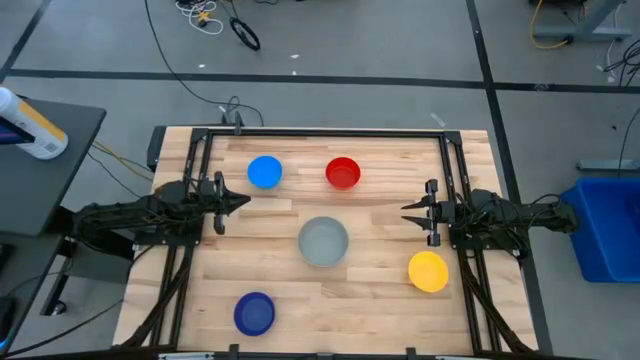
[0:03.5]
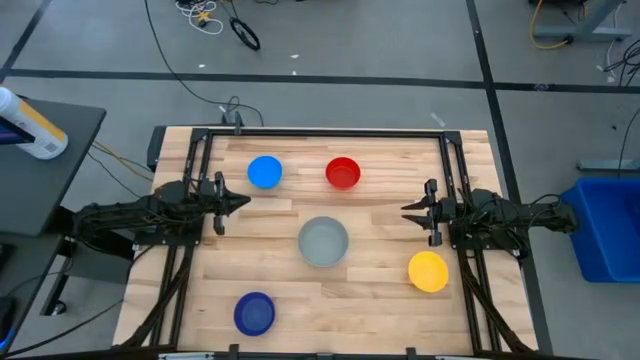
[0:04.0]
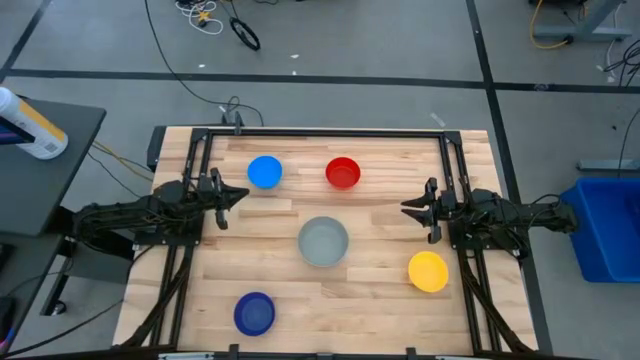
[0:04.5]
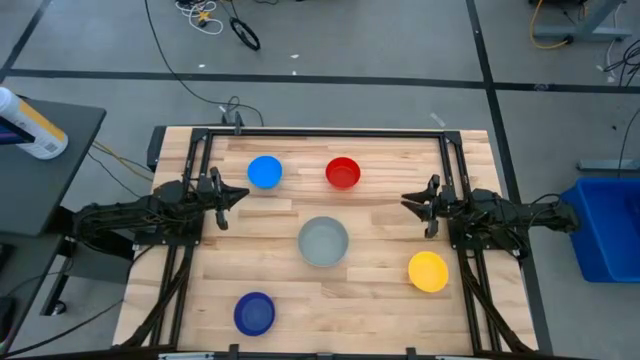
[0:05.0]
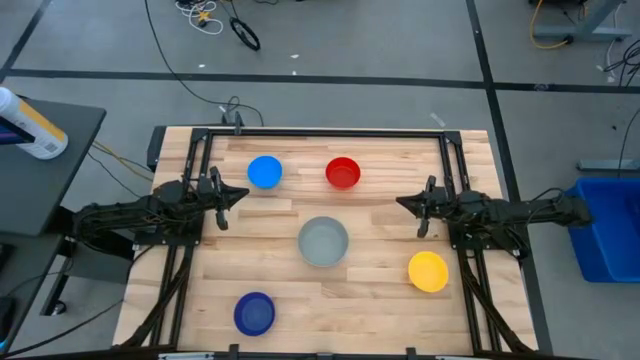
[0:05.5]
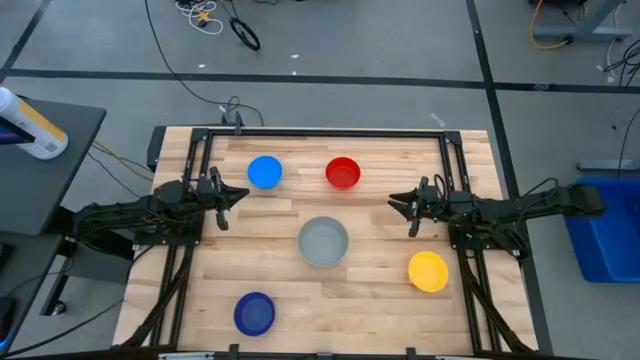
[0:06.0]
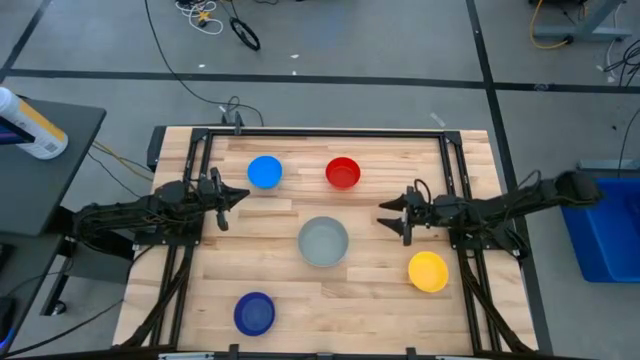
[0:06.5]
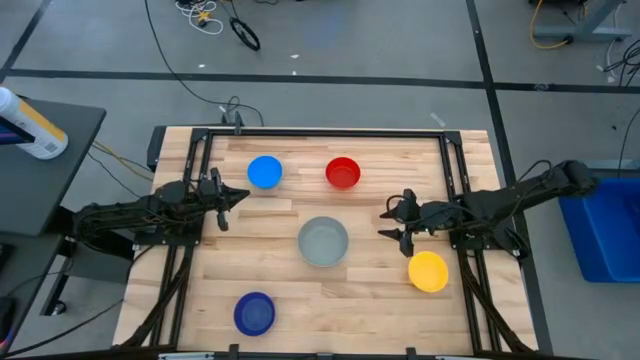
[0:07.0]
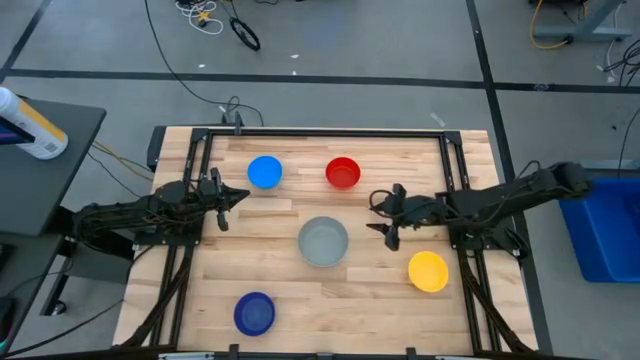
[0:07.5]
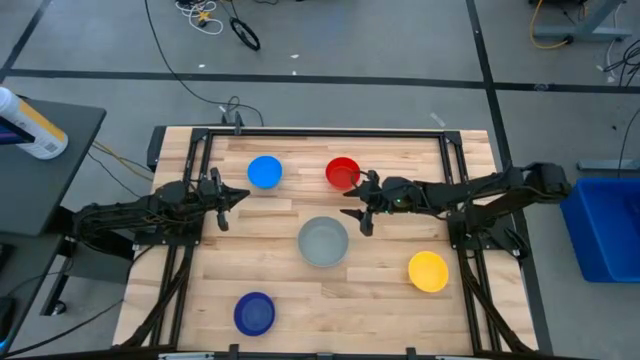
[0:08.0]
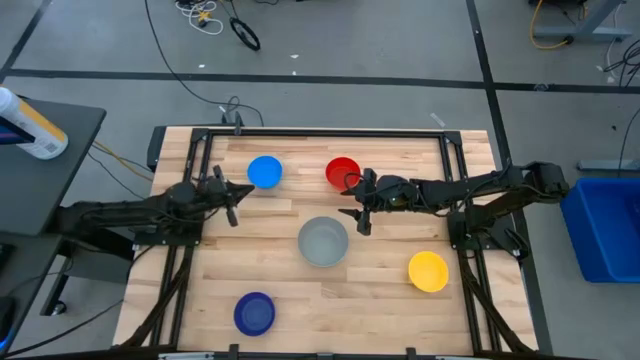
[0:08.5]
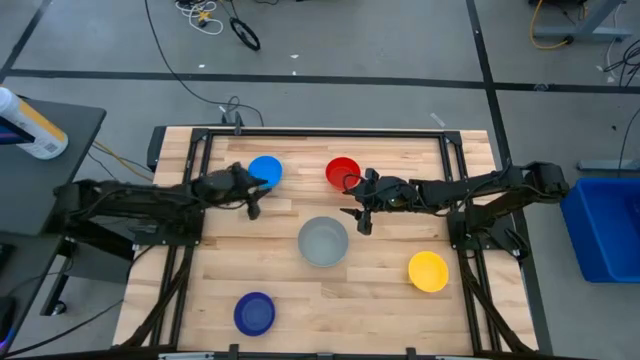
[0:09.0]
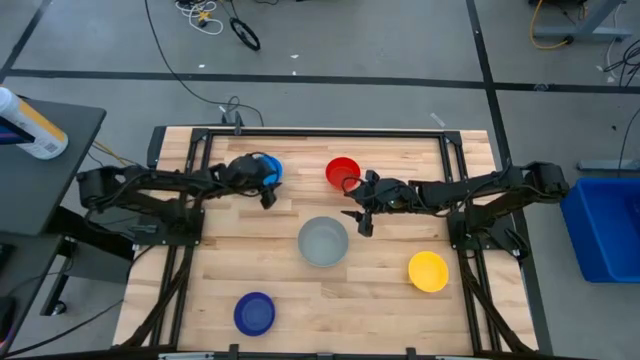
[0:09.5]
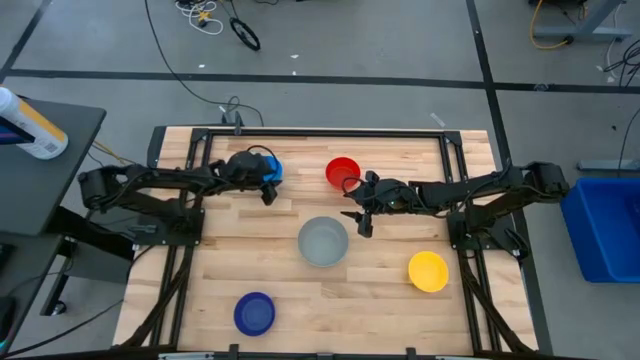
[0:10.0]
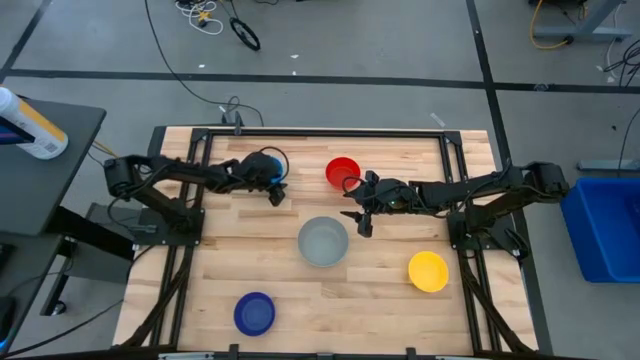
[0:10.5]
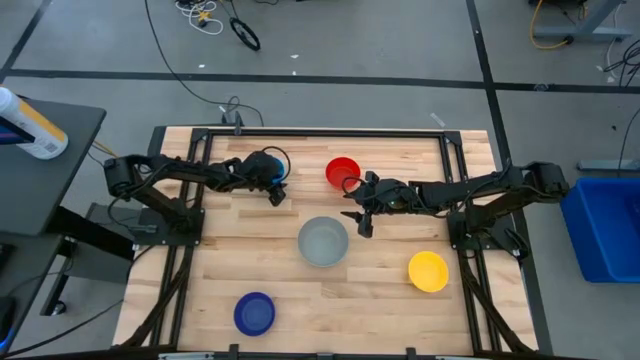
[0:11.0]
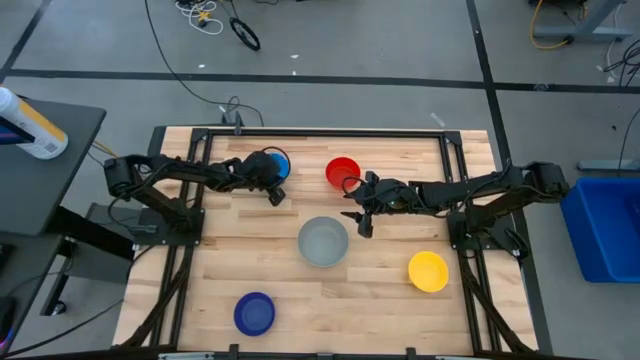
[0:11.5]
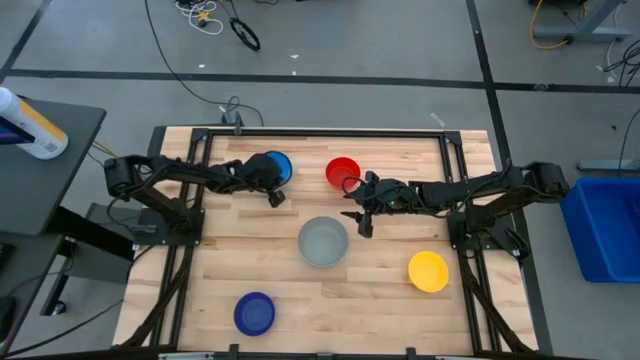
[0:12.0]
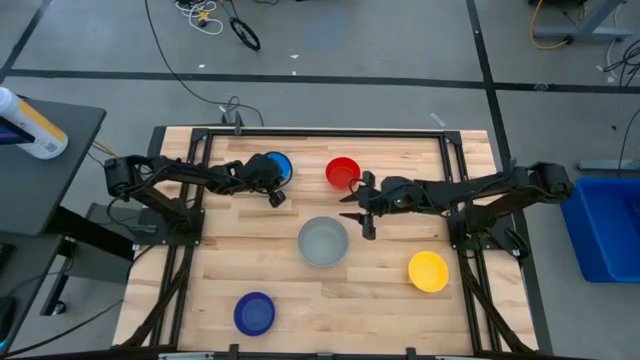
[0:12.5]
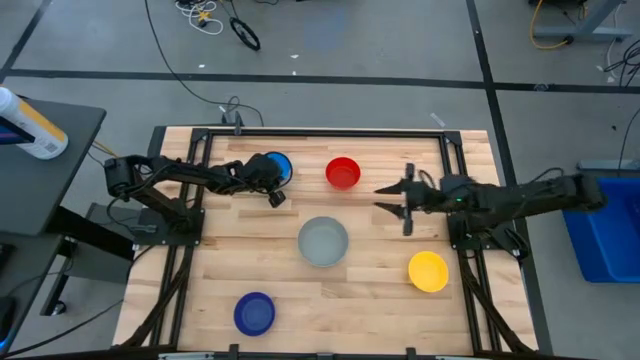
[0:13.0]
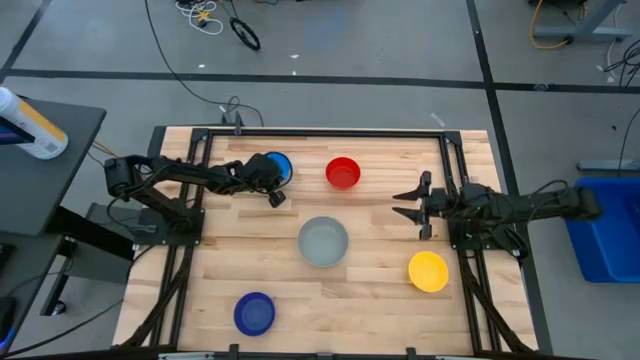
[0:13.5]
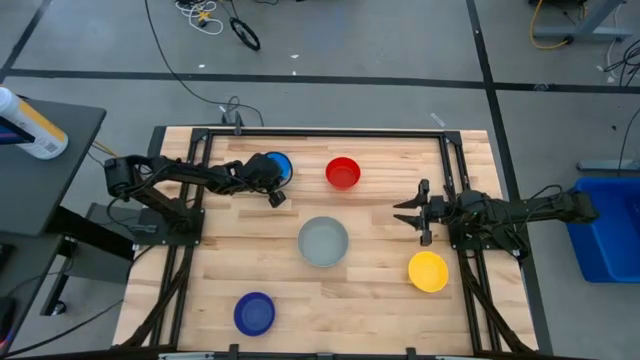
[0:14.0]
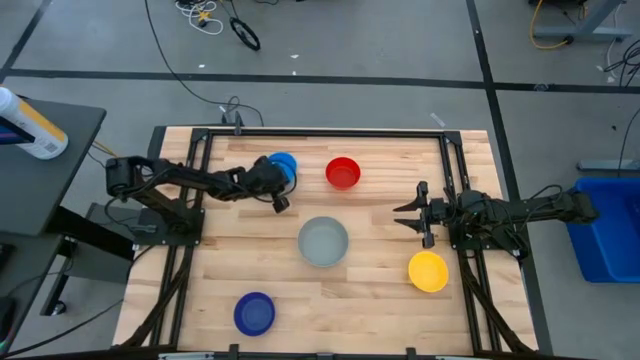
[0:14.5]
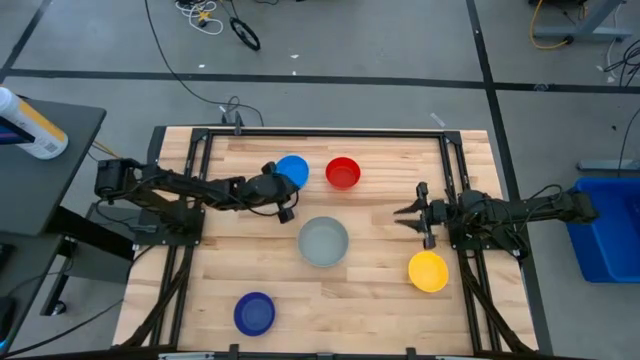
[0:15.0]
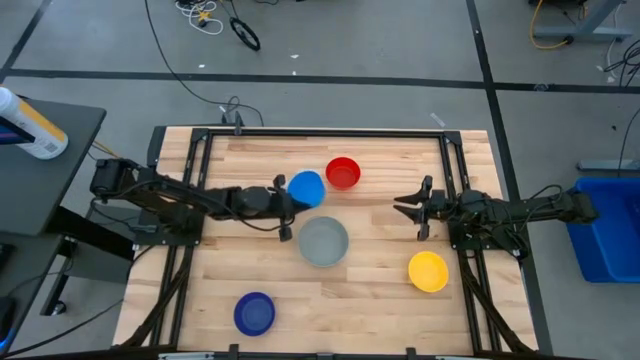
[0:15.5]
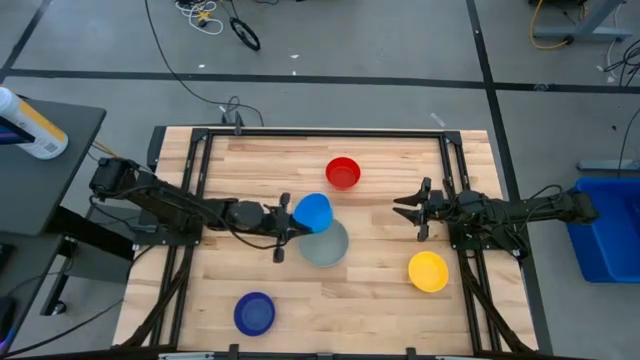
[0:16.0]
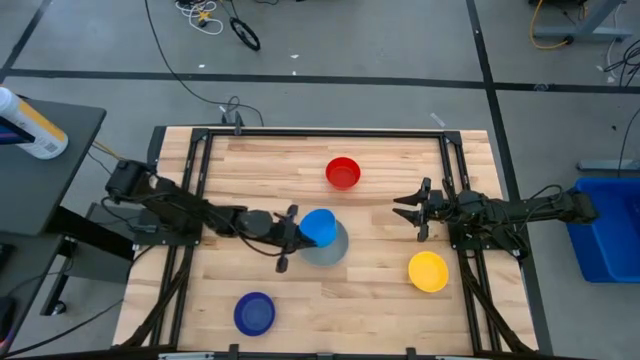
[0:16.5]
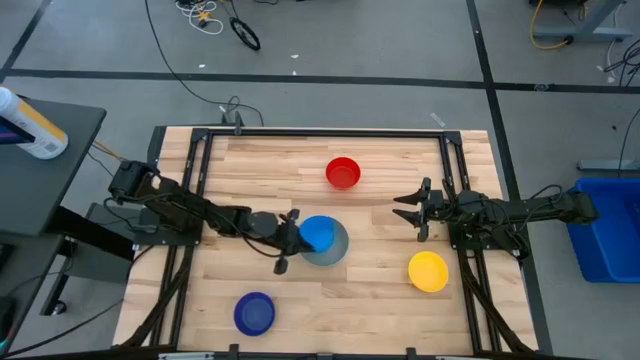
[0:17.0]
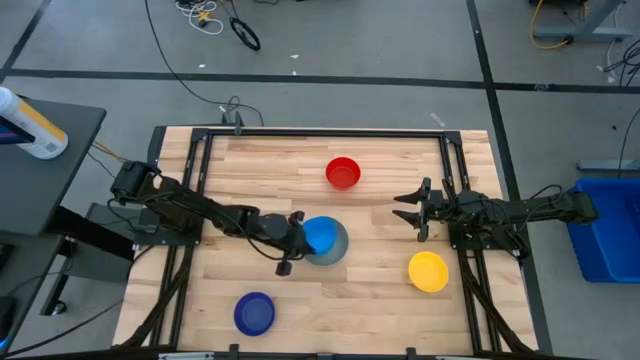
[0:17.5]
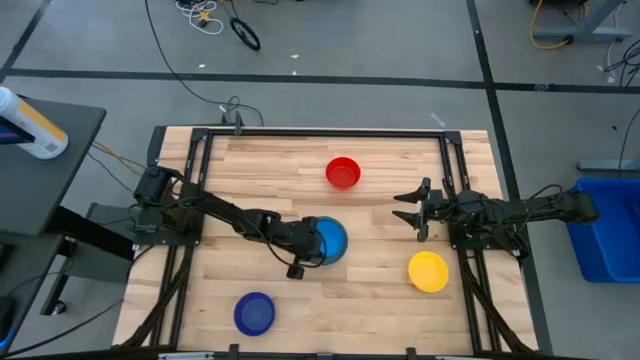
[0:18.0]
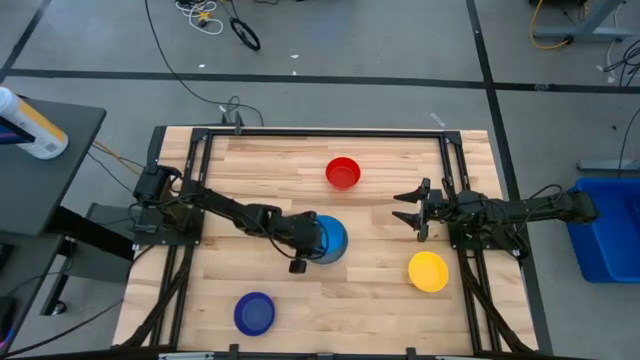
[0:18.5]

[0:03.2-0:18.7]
Stack the light blue bowl on the gray bowl

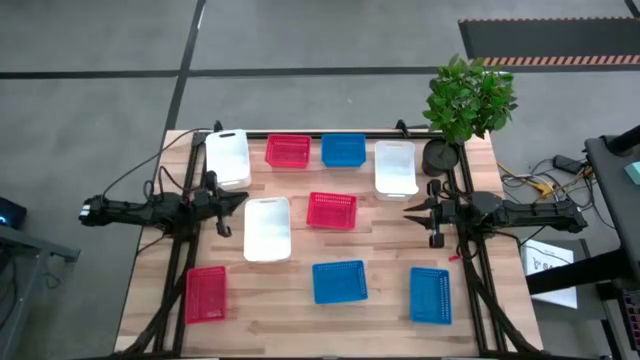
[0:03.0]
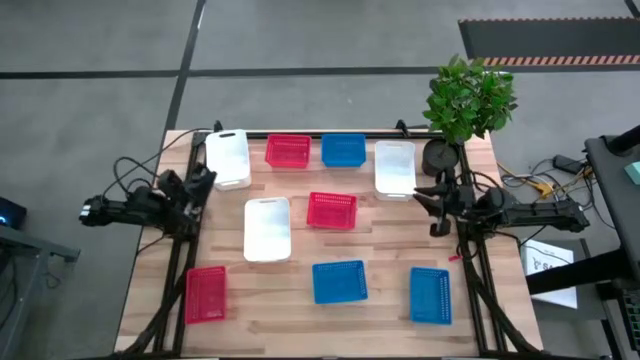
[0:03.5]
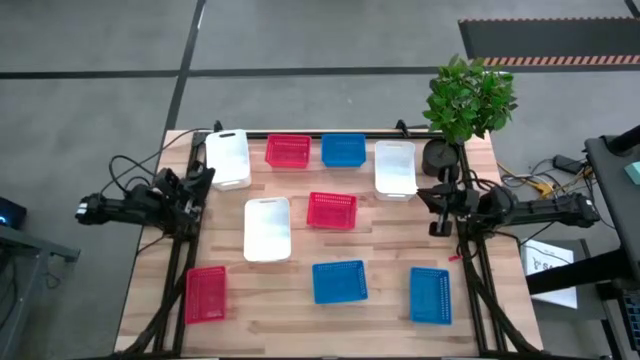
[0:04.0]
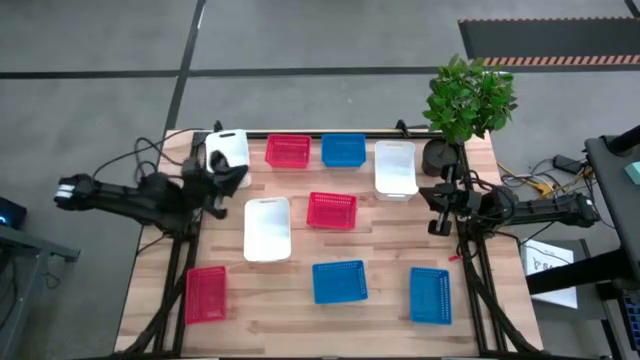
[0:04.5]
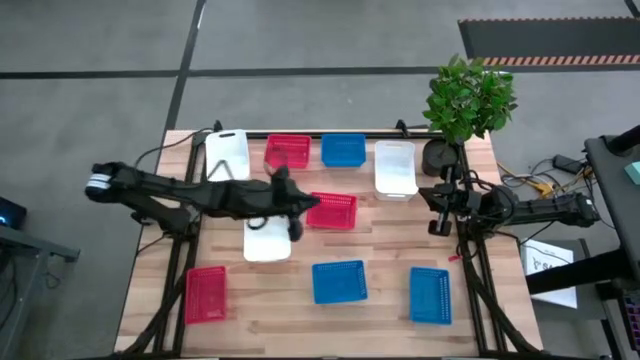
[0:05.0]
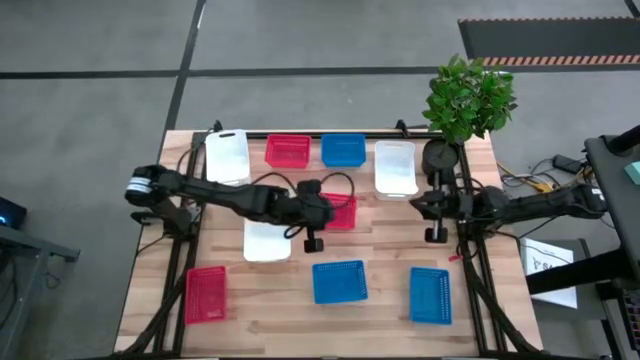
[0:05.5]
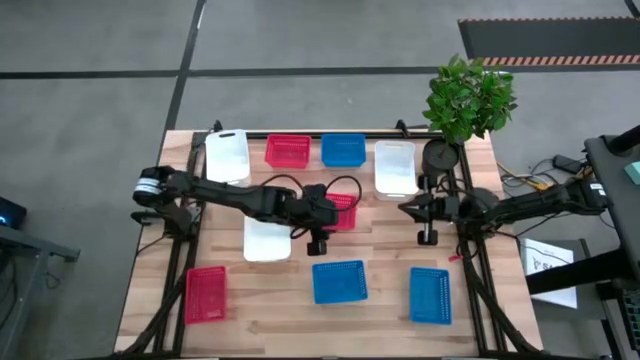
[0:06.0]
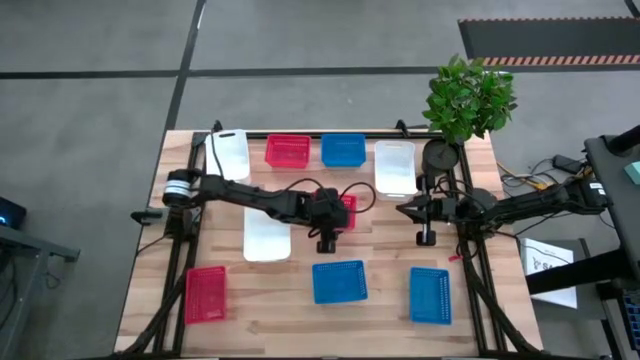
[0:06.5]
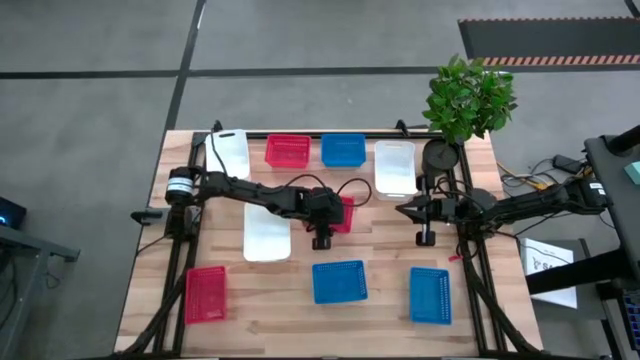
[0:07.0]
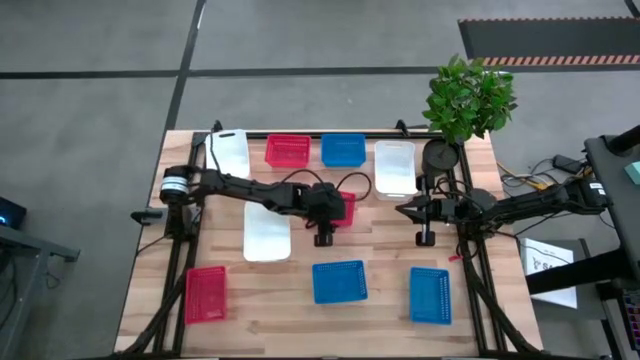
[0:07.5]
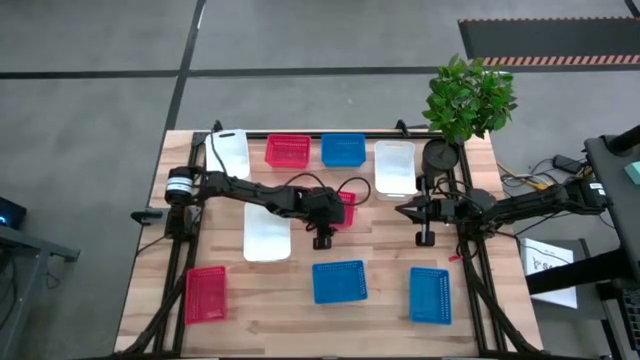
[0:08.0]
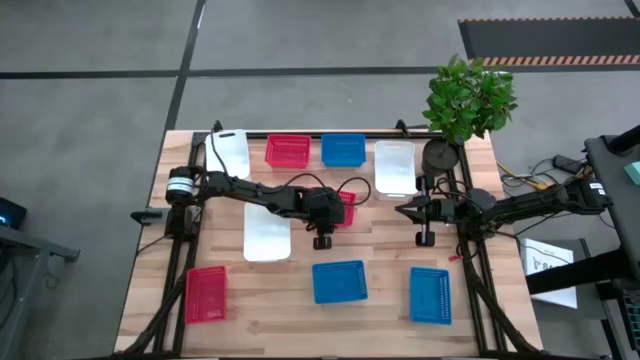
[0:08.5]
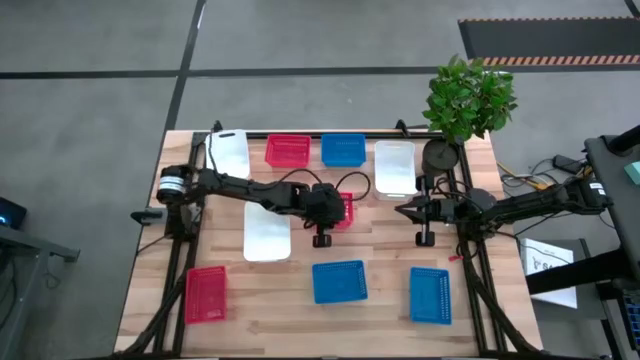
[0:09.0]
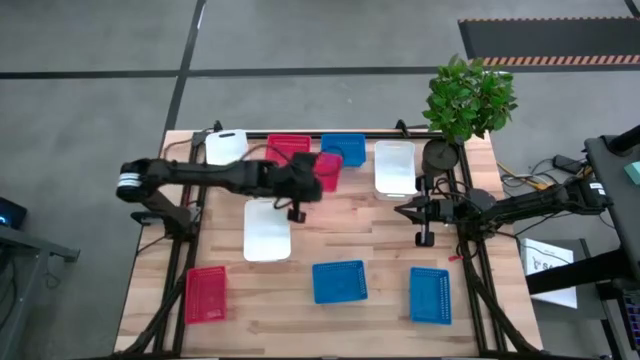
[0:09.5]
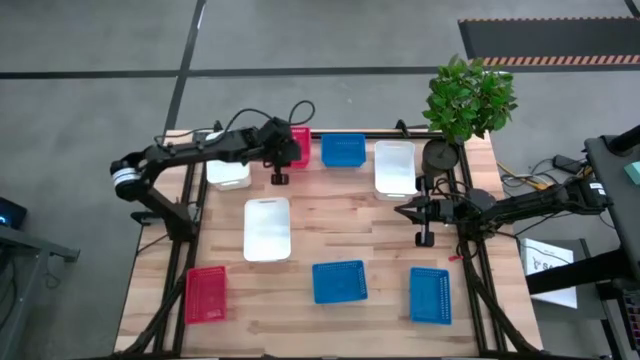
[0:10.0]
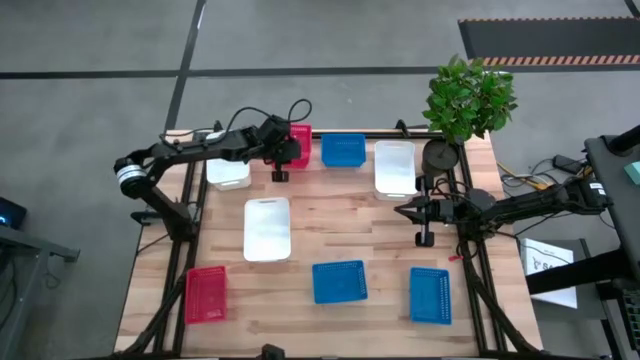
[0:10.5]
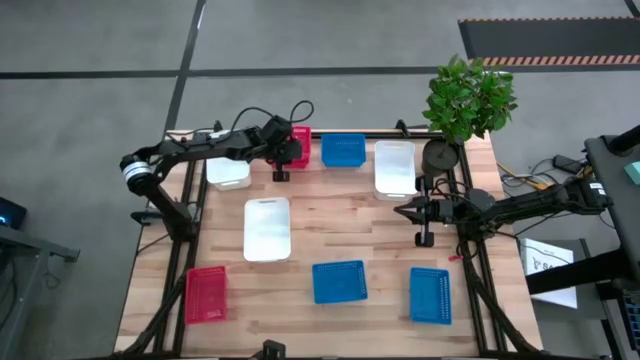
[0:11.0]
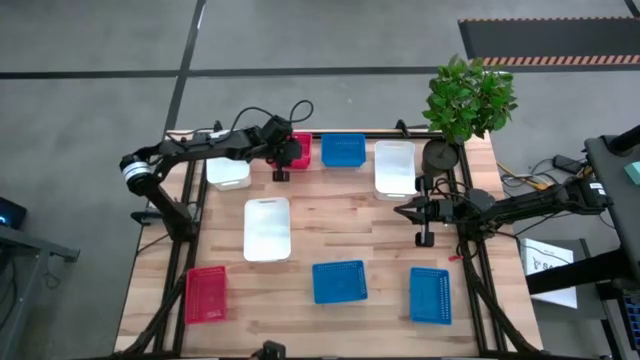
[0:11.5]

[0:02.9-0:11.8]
Stack the middle red bin on the top red bin
